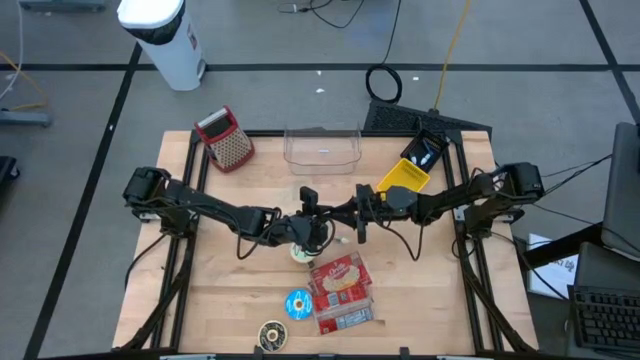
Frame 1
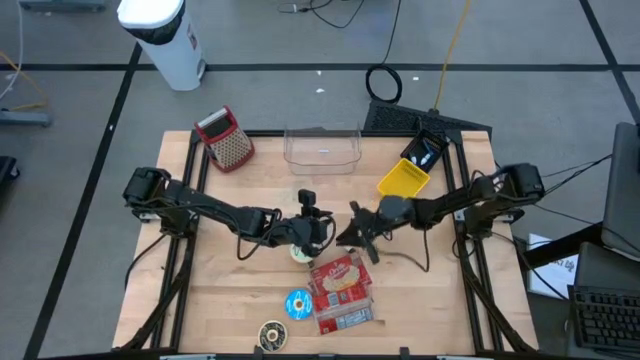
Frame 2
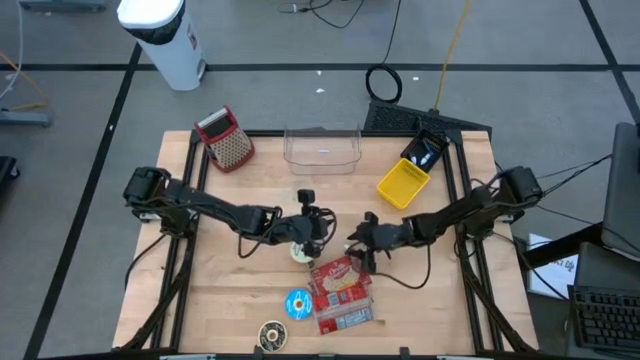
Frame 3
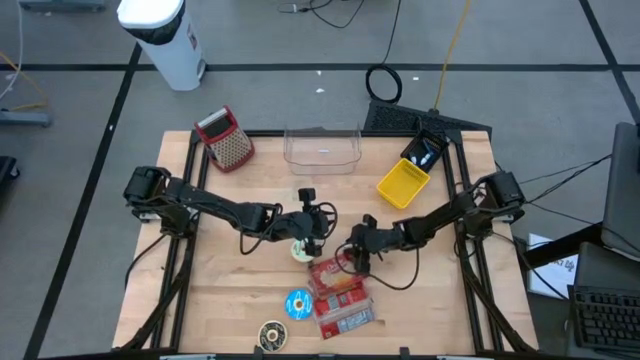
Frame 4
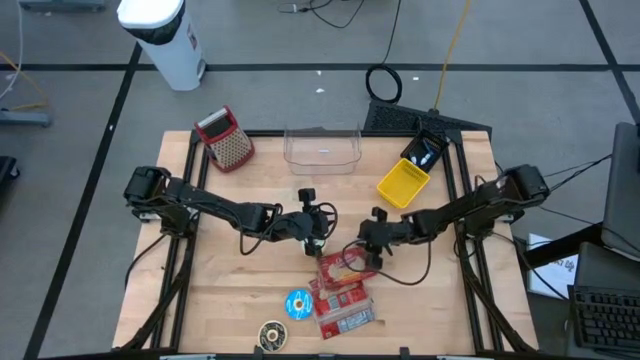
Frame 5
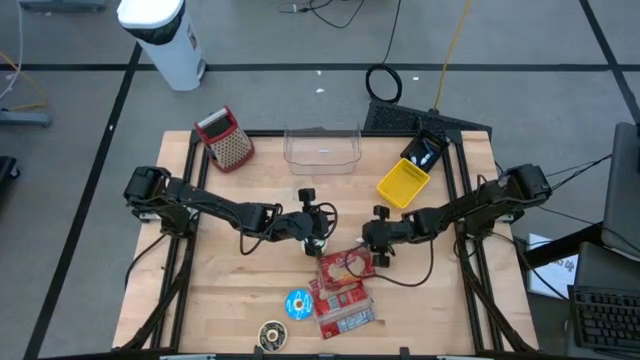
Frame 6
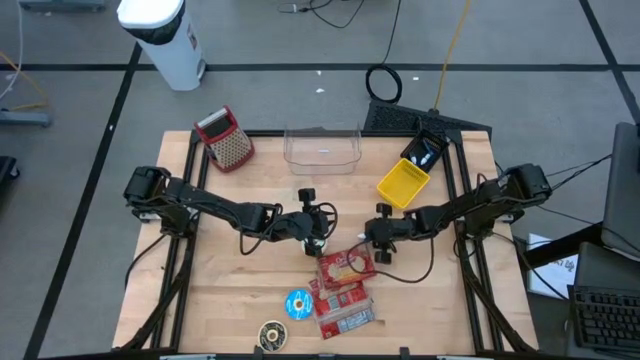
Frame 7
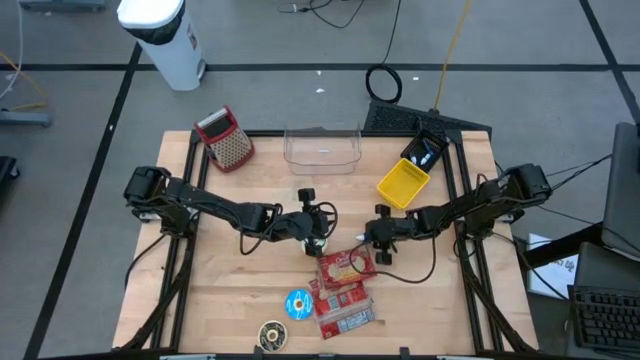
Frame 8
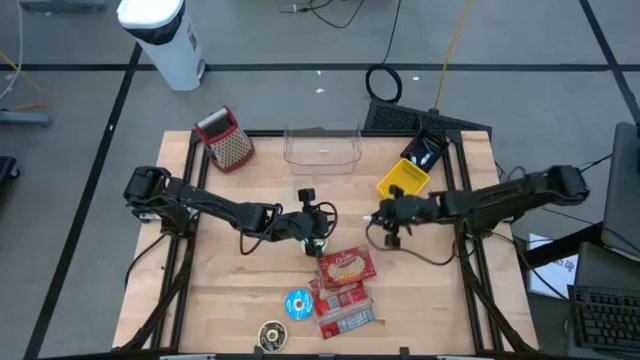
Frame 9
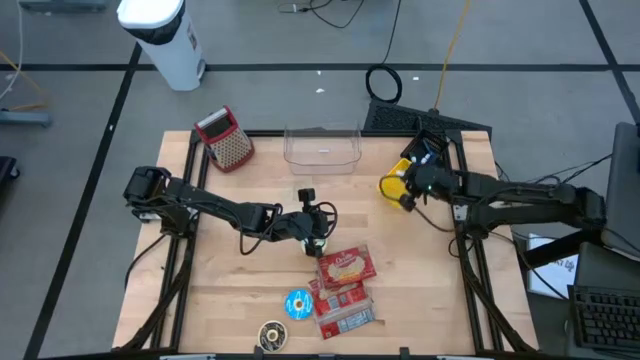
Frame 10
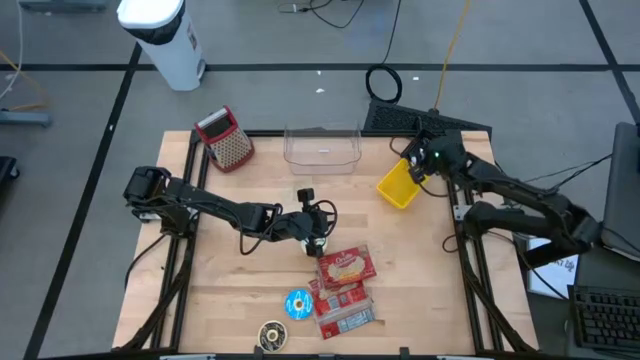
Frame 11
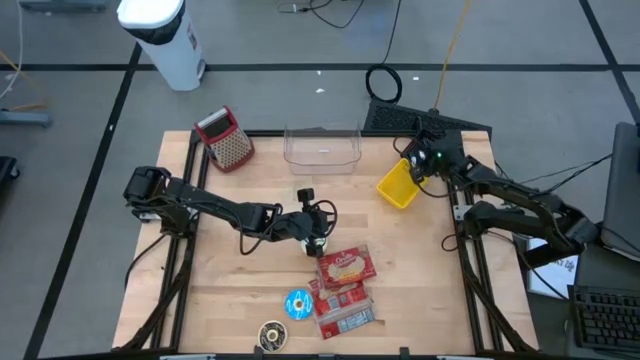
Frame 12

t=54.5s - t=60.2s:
Put the brown food coloring bottle into the black bin

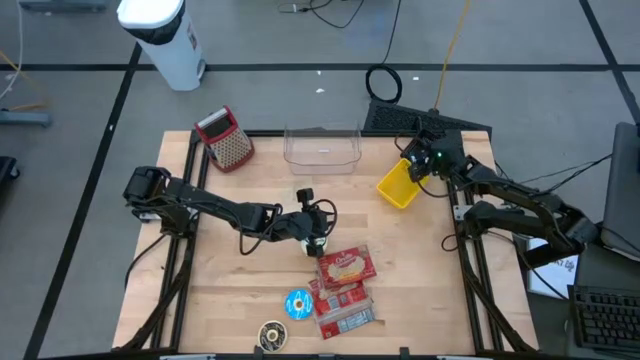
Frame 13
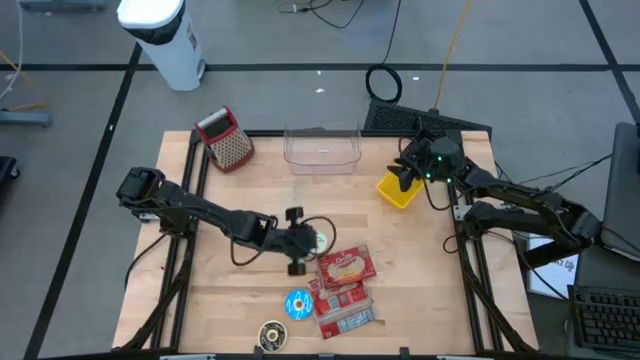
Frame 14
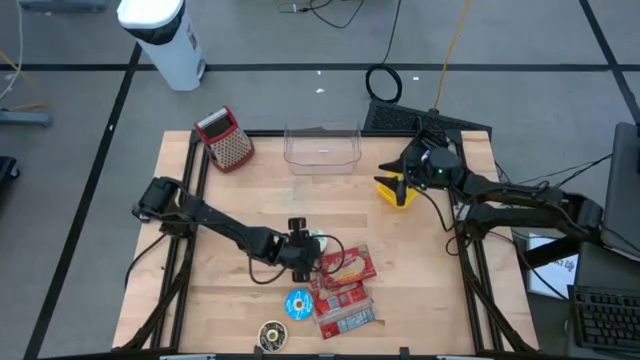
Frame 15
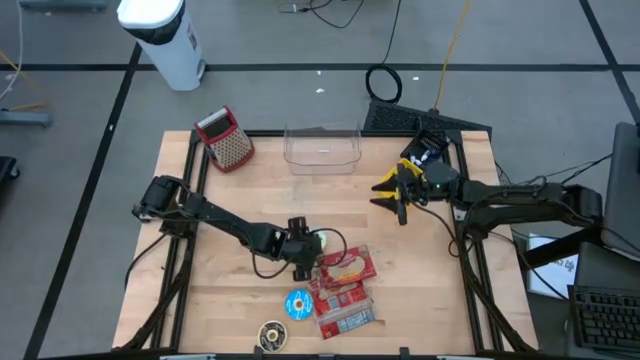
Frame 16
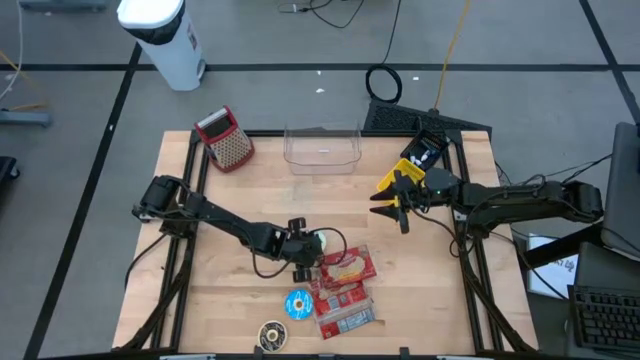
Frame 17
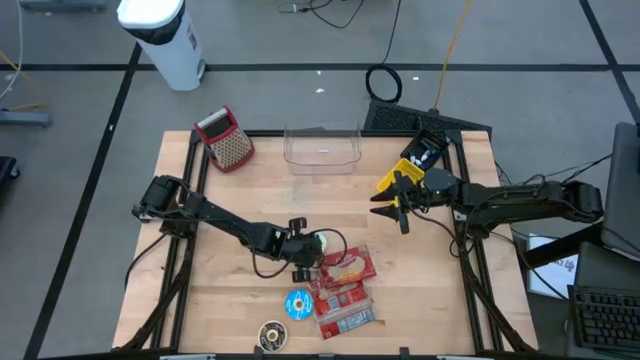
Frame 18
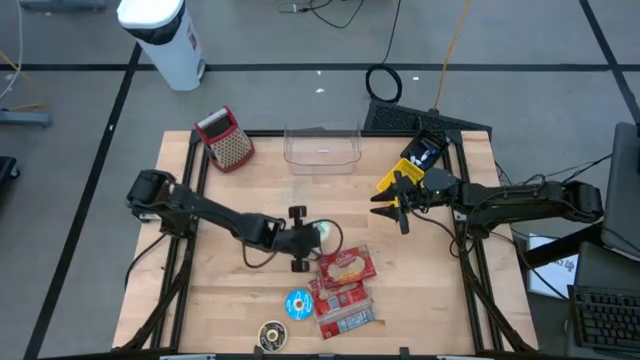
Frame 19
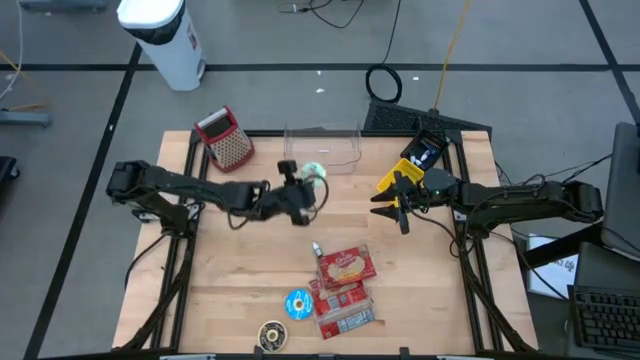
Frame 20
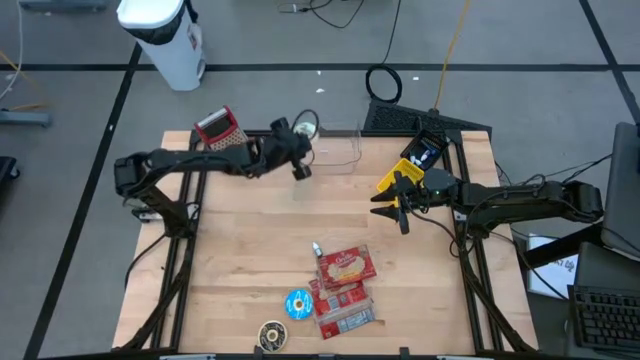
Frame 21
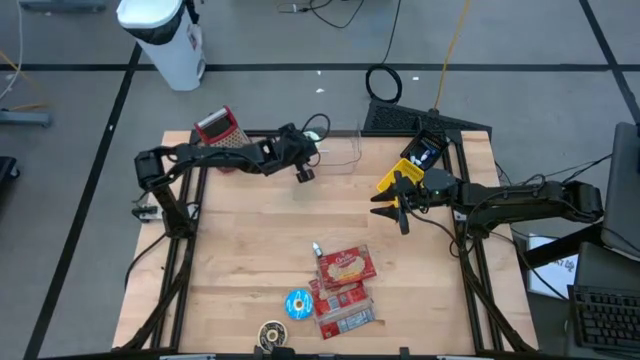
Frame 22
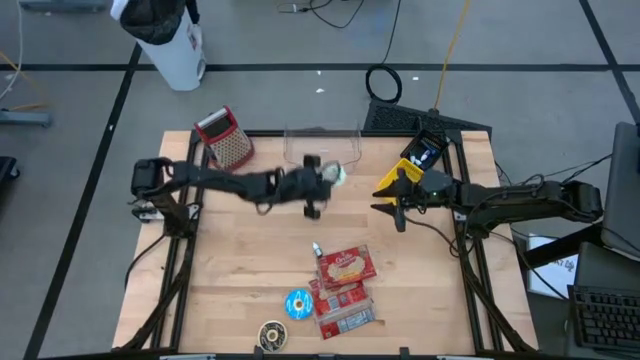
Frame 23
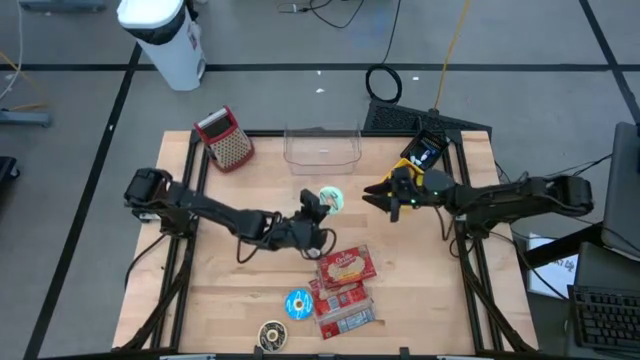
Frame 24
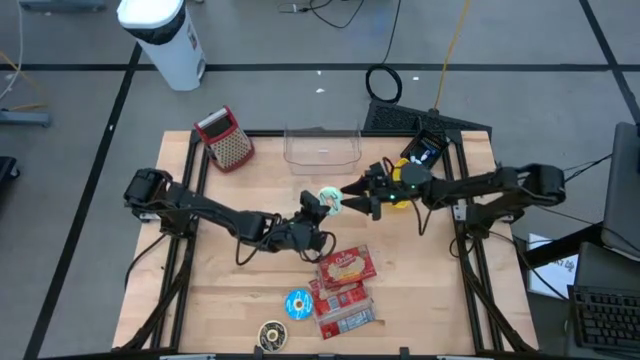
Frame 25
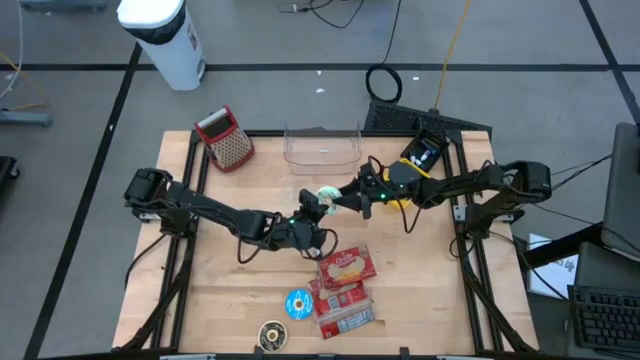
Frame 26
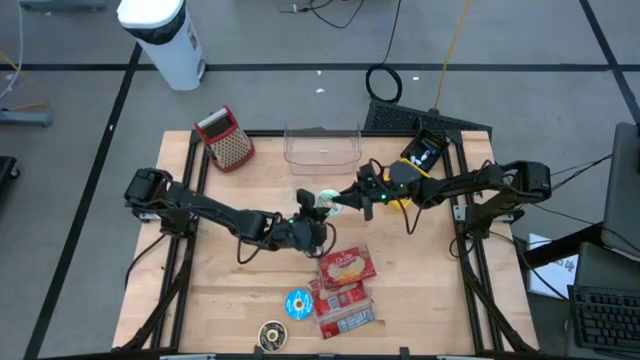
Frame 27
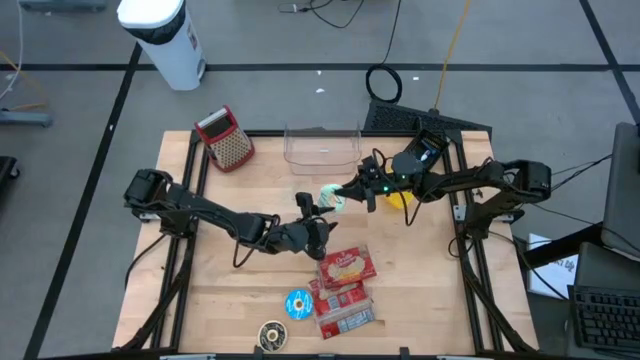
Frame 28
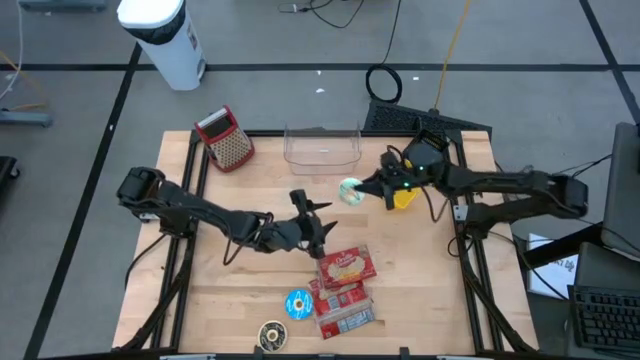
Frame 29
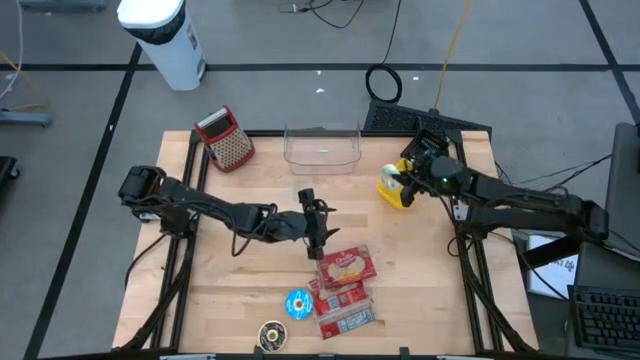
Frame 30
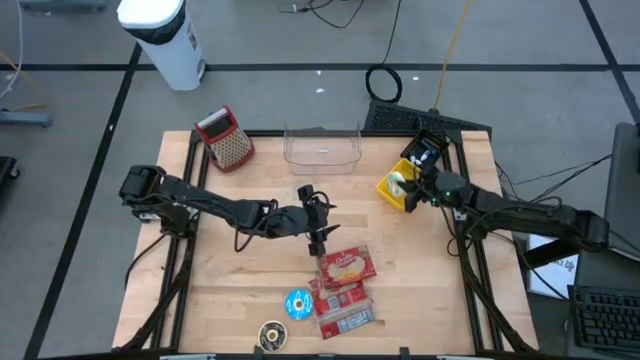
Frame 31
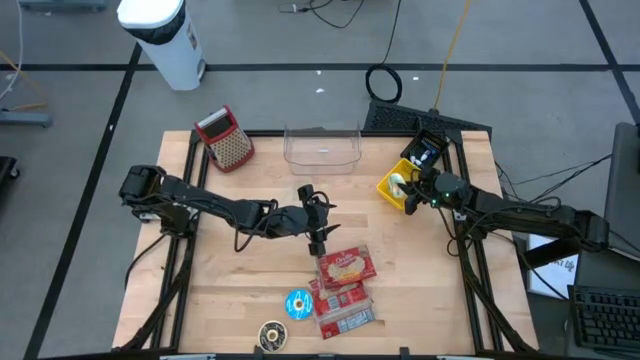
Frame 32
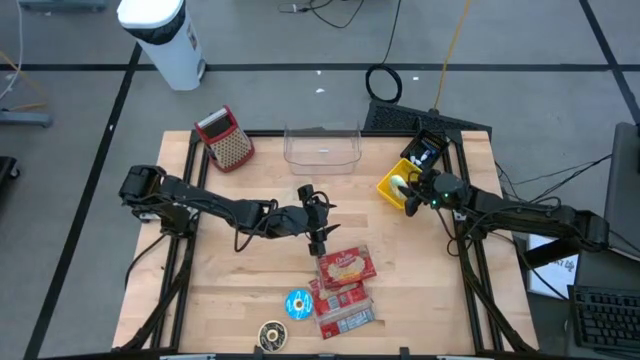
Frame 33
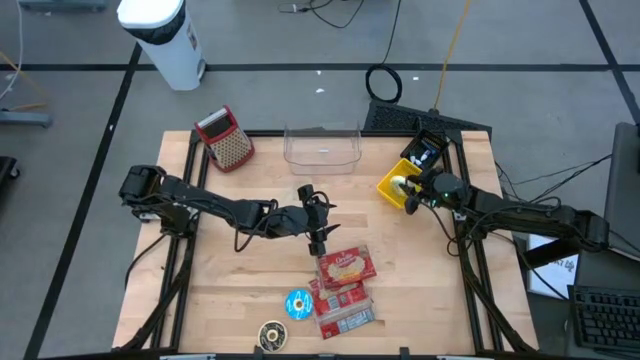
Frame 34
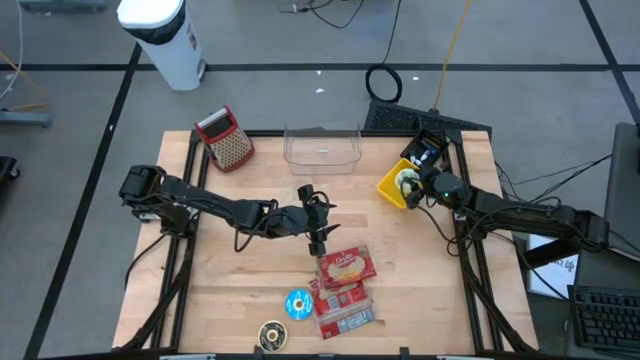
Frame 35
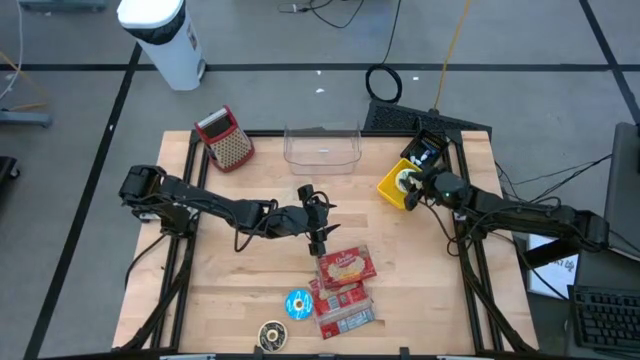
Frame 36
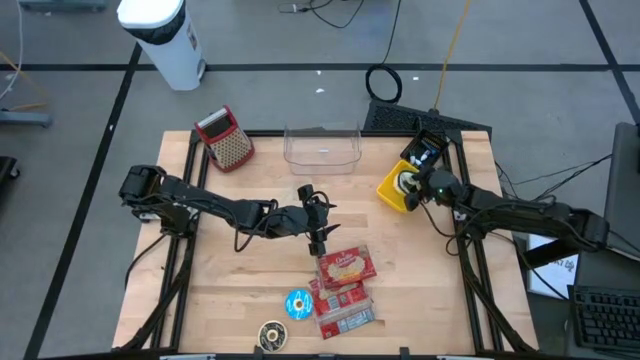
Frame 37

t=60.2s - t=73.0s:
Put the light blue donut into the yellow bin
